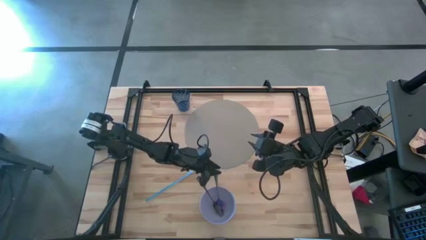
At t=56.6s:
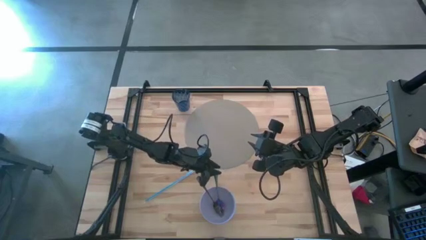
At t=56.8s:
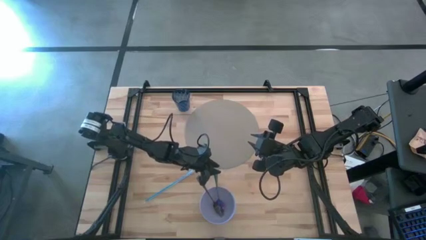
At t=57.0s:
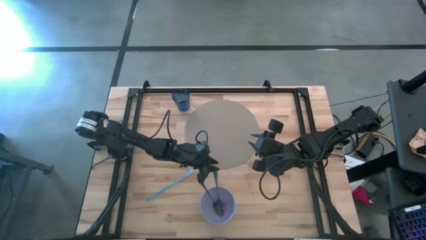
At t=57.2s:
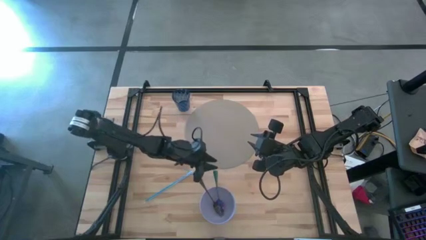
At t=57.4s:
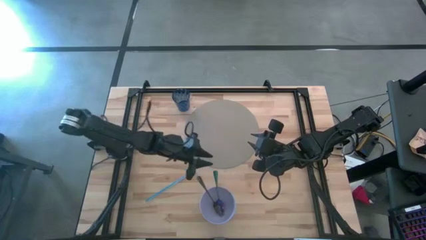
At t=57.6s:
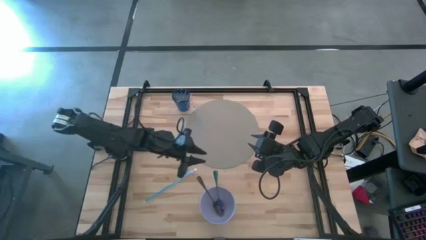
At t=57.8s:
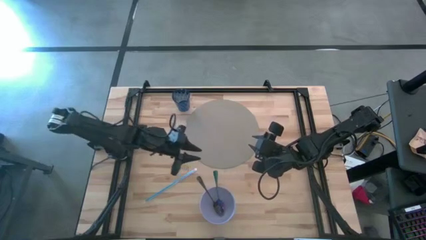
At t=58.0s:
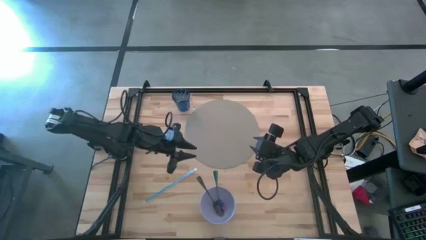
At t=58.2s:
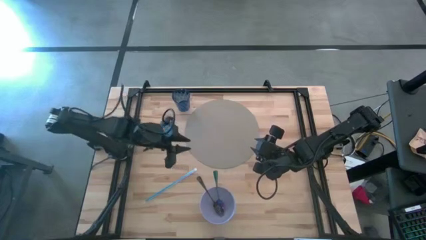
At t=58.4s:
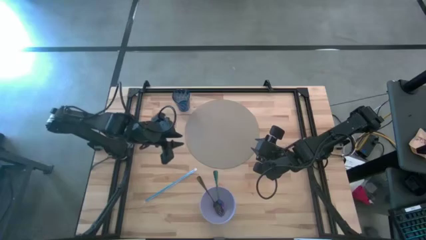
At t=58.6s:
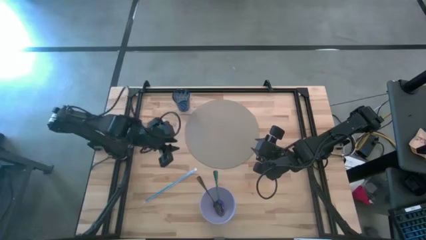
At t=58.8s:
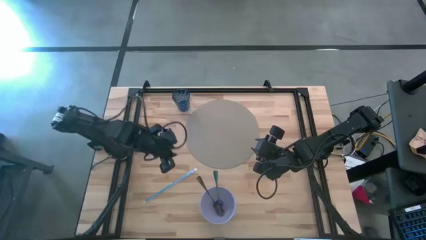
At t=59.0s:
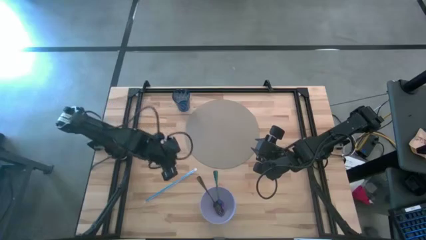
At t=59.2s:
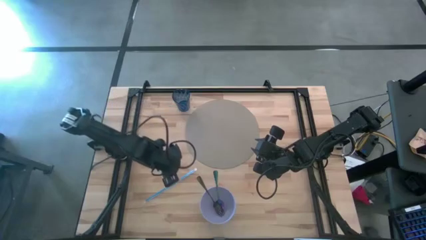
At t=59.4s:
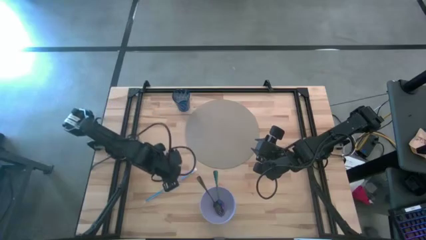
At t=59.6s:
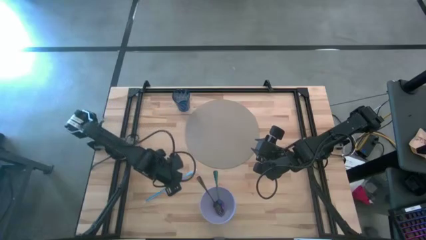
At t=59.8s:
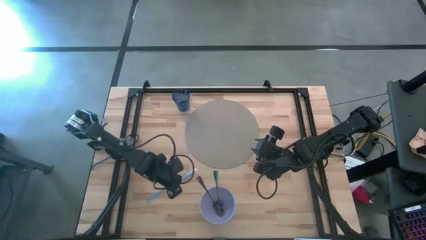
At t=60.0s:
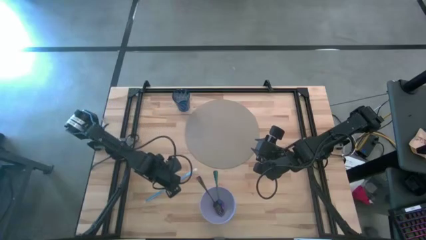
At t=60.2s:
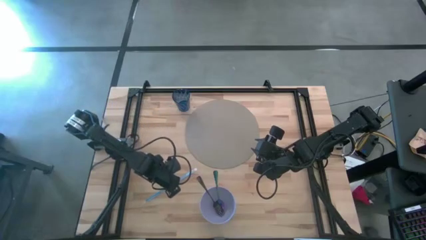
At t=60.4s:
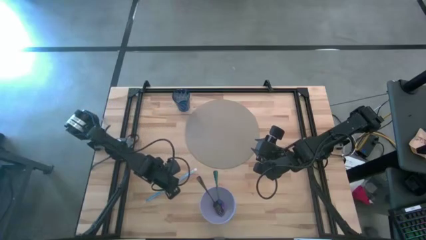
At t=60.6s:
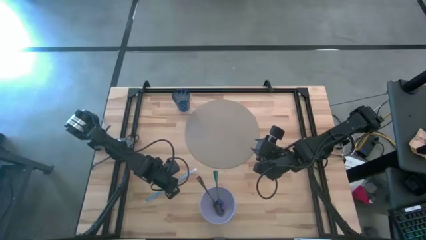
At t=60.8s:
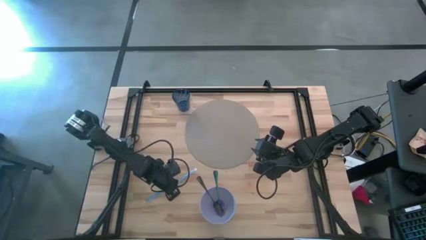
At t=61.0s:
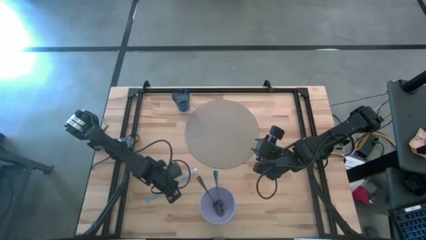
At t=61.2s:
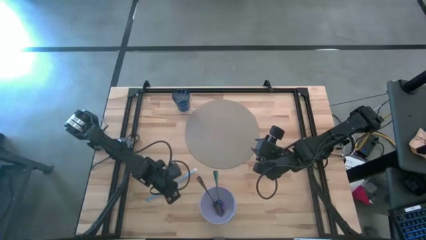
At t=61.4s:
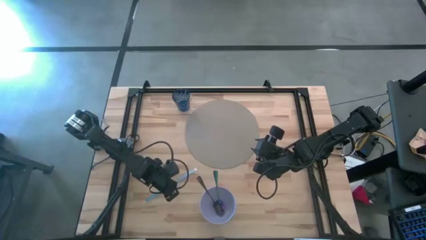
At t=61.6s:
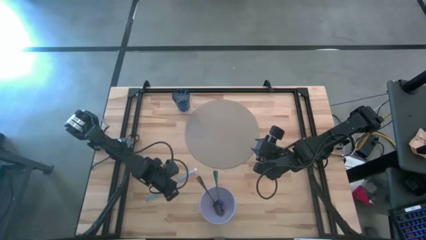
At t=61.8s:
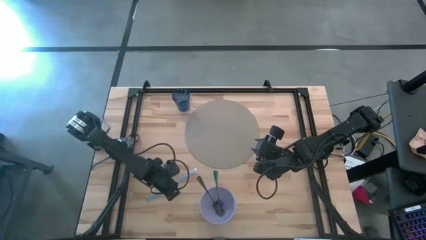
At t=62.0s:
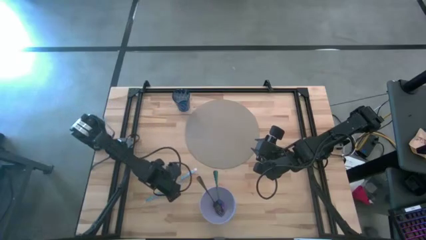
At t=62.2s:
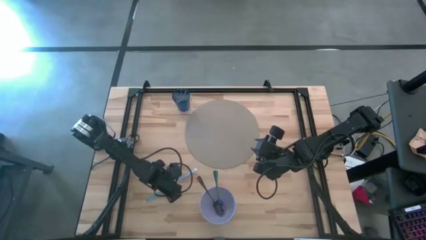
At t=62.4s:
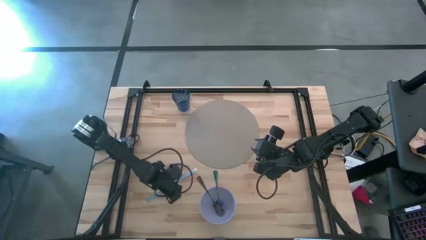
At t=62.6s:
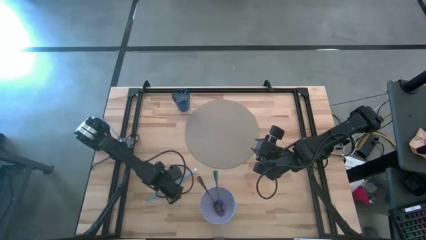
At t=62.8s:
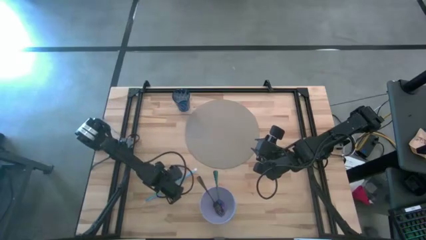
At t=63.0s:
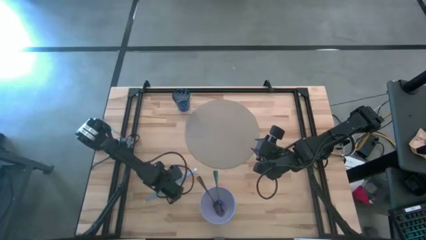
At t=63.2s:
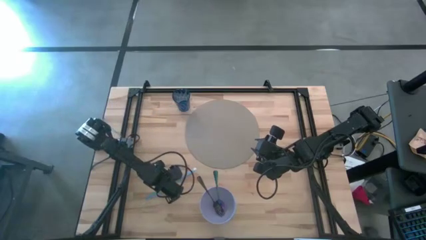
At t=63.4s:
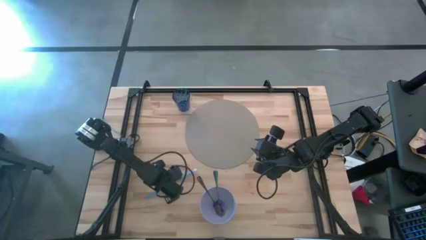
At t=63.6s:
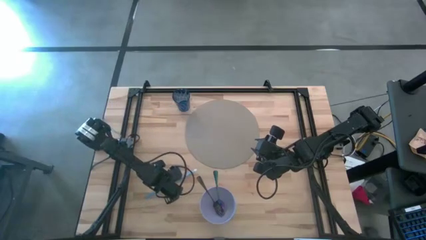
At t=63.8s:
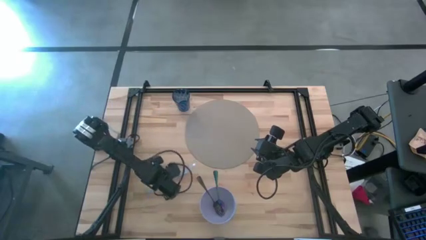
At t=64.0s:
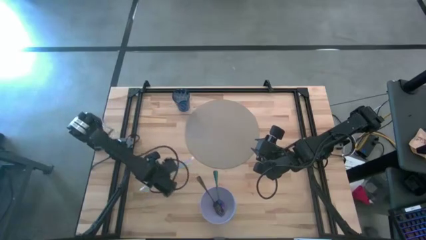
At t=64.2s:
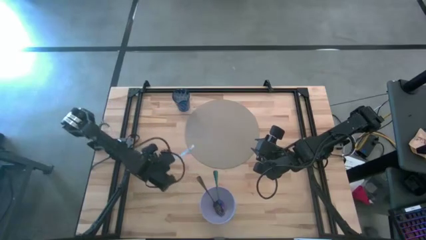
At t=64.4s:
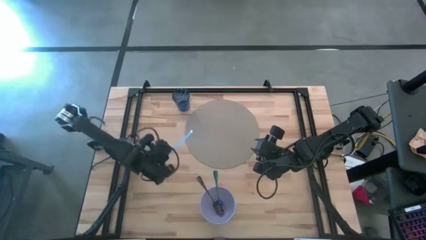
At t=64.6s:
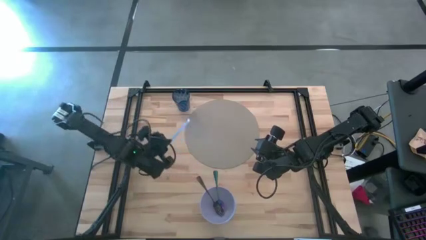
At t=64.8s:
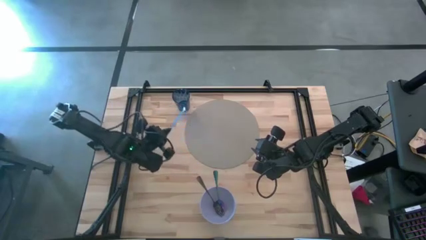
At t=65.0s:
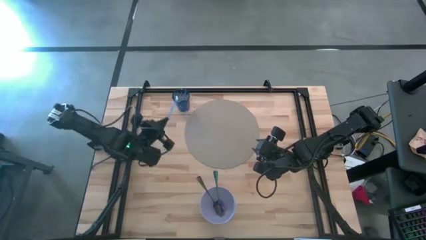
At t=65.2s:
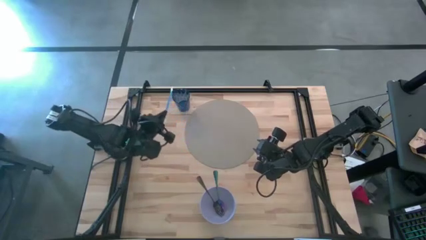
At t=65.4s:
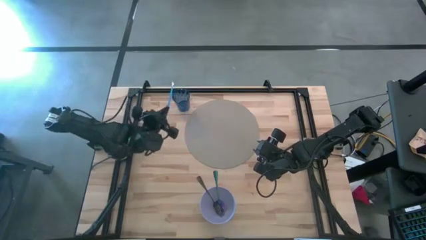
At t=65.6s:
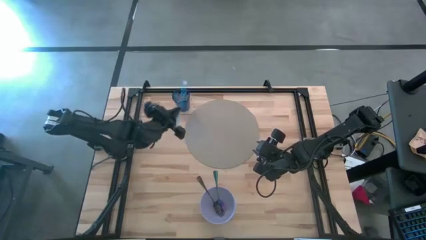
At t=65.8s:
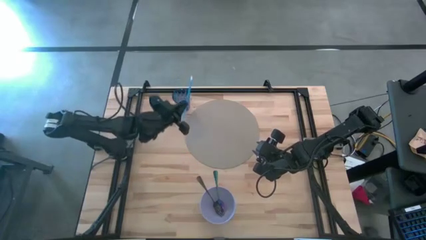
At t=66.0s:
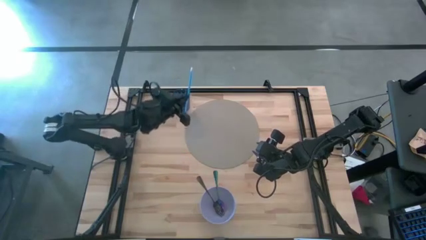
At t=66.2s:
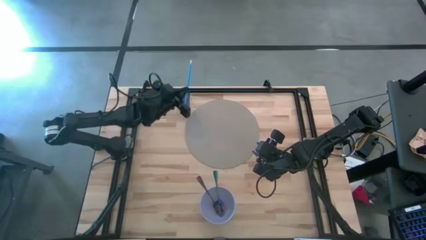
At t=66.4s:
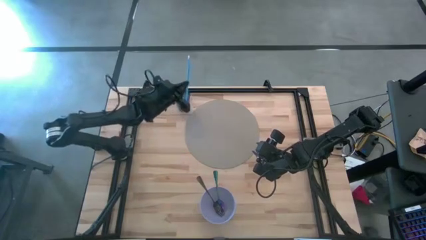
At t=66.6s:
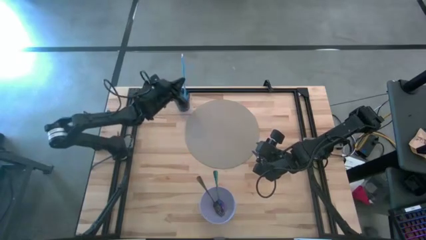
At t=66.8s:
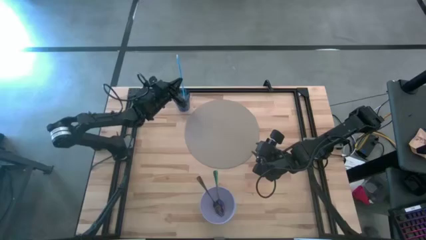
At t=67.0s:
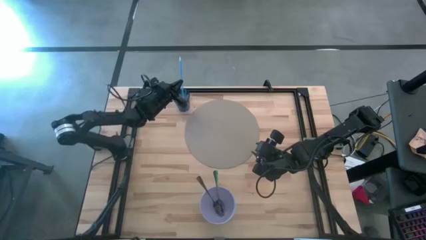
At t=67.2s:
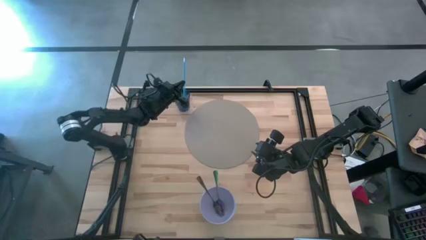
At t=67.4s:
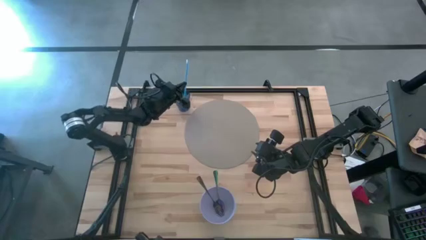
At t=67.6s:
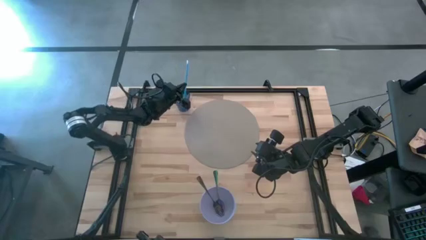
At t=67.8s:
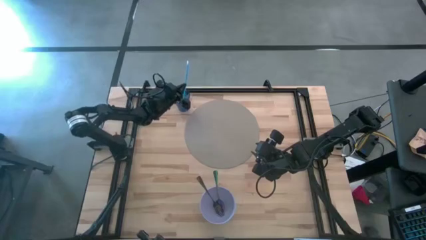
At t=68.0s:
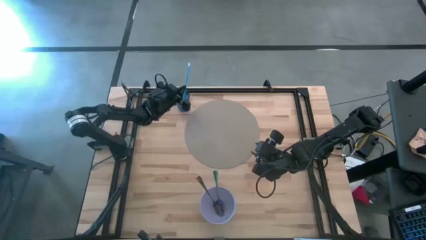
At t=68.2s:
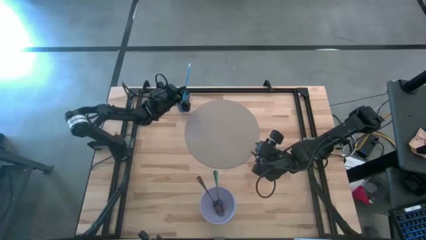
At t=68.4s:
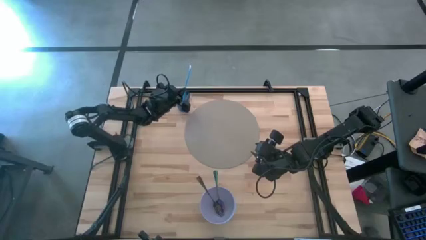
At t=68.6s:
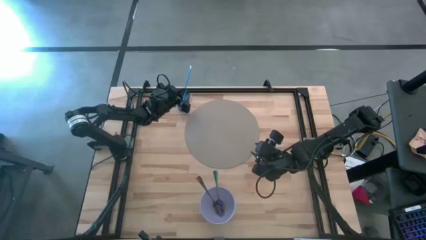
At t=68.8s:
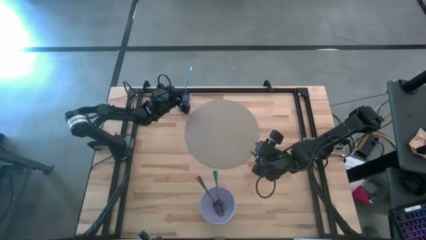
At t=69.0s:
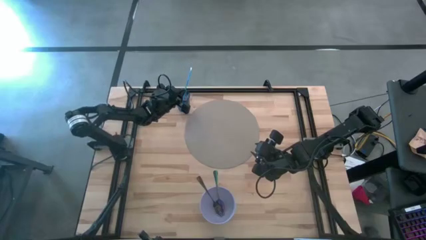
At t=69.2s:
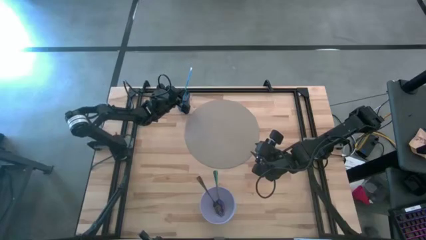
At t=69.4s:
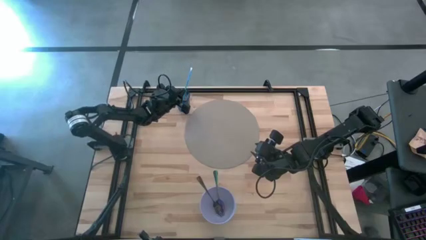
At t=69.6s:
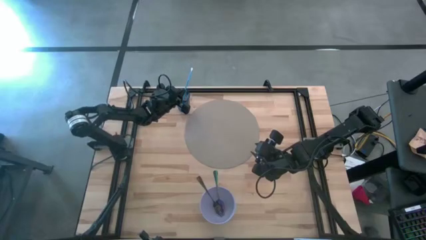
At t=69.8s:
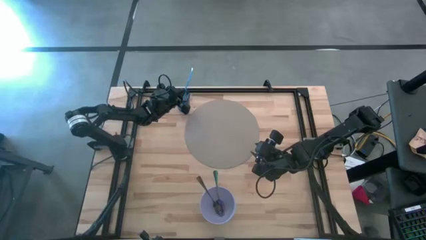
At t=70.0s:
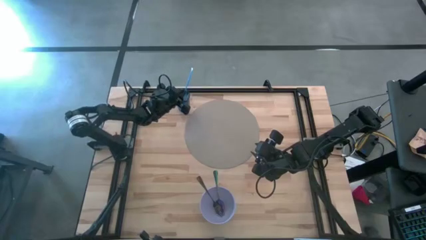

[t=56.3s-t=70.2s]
Task: Pick & Place Utensil
Put the blue straw into the blue cup

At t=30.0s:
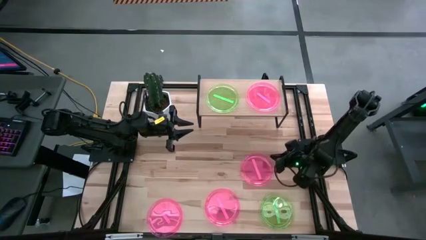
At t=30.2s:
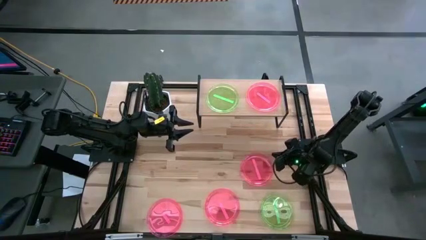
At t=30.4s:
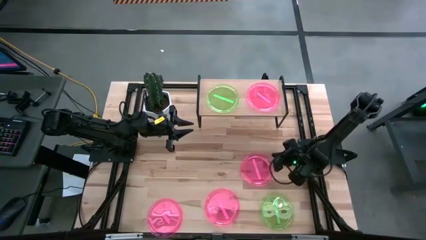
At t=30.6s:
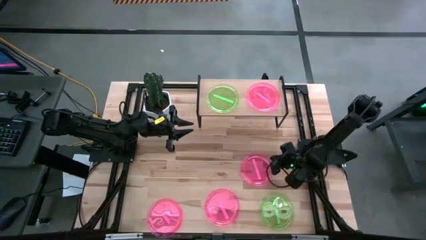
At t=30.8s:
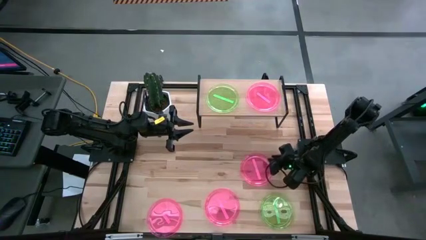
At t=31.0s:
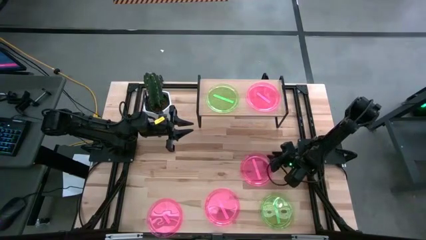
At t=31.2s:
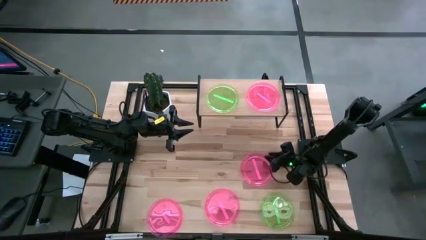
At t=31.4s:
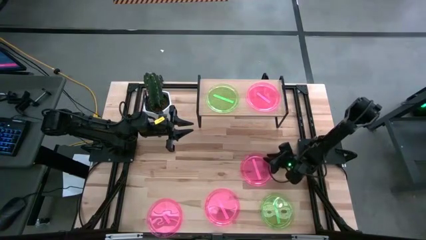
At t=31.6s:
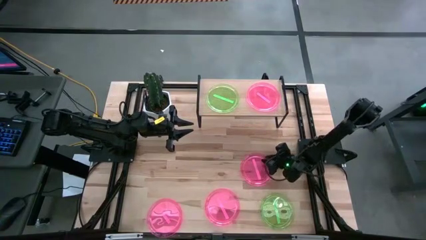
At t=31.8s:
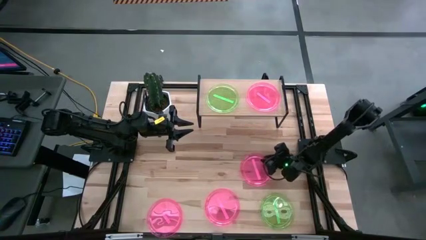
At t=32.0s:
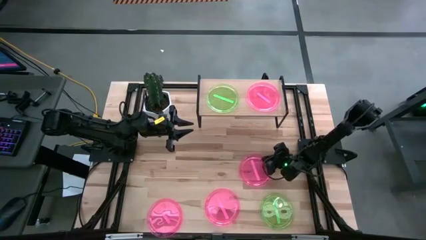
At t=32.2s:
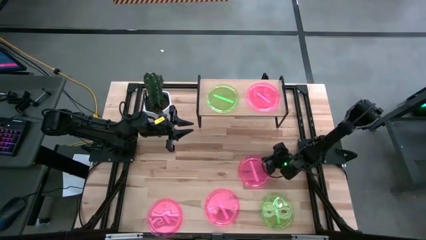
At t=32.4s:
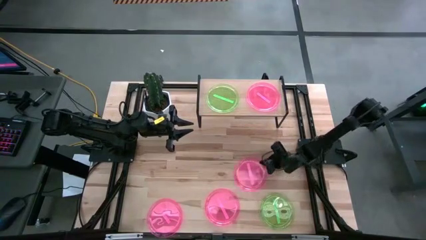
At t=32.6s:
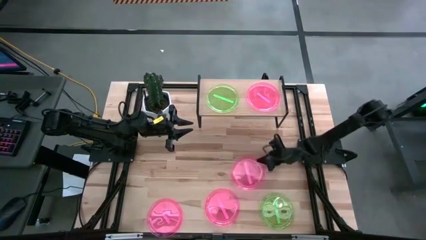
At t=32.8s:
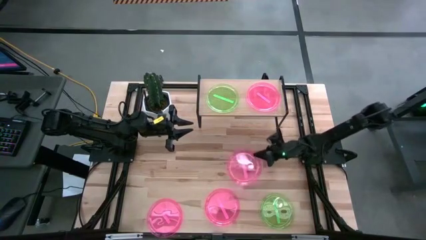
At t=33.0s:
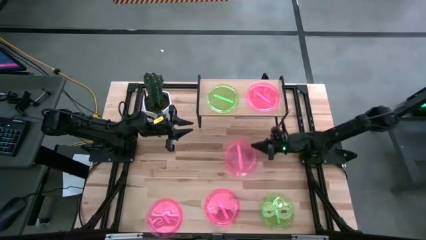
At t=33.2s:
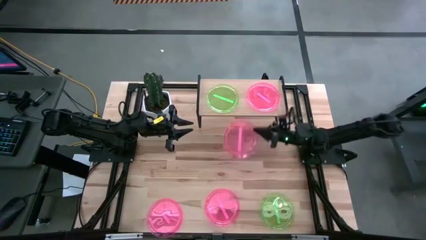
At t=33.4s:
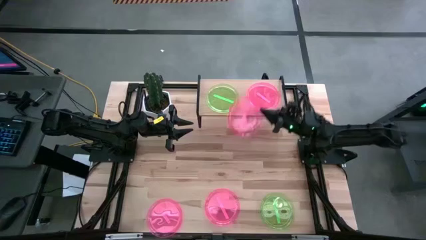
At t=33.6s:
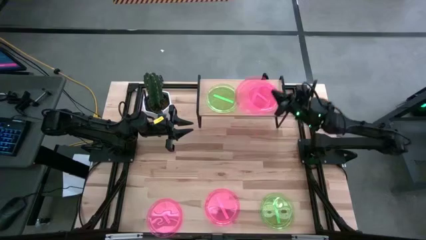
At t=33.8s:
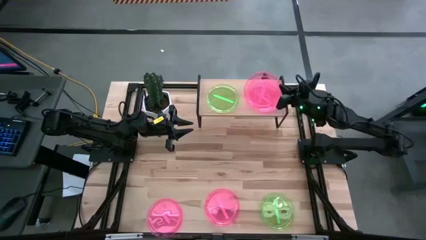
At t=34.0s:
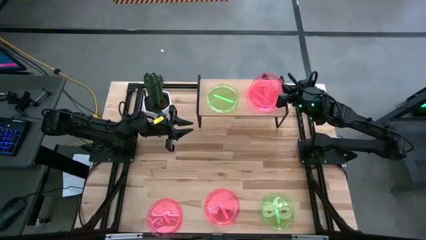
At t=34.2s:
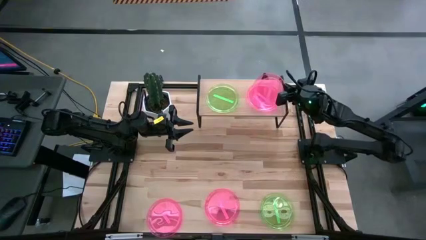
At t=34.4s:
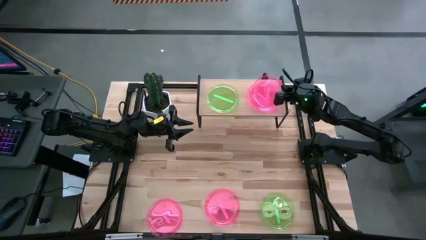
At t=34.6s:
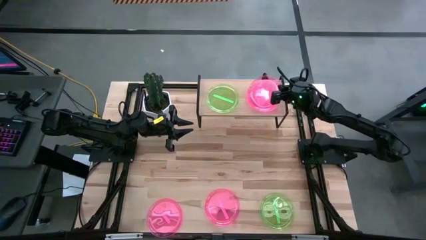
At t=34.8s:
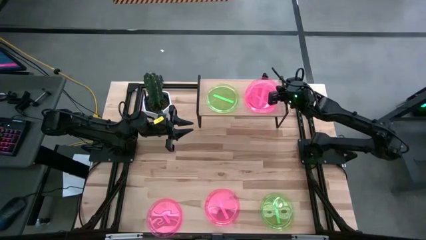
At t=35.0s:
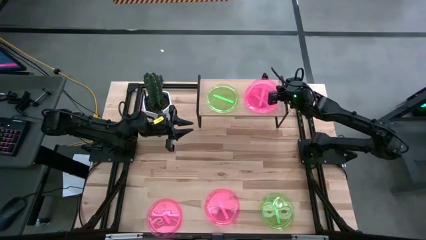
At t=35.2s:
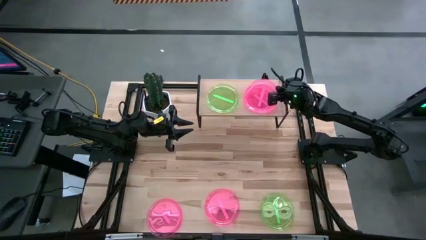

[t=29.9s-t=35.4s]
Task: Place and stack plates onto a shelf
Stack the pink plate on top of the pink plate on the shelf
